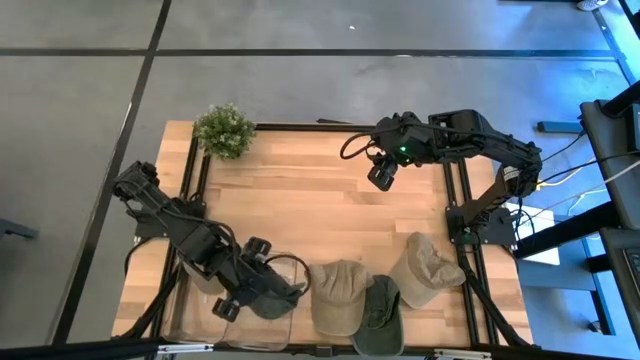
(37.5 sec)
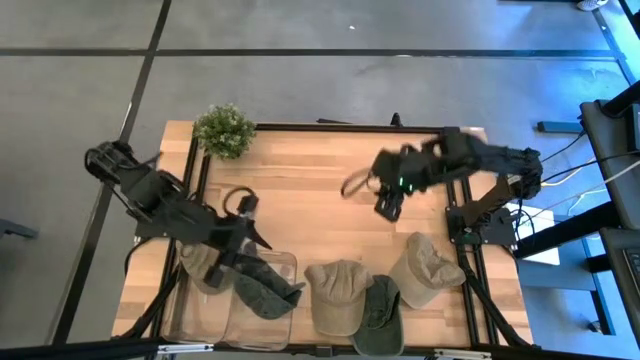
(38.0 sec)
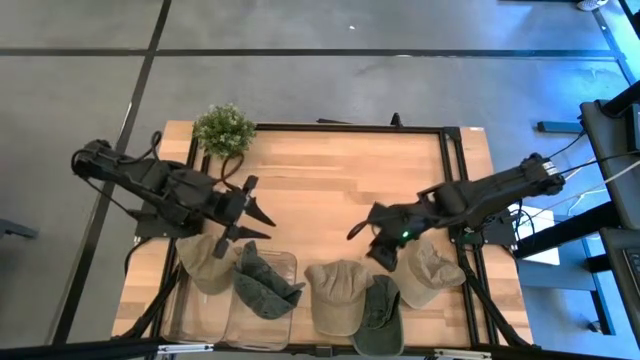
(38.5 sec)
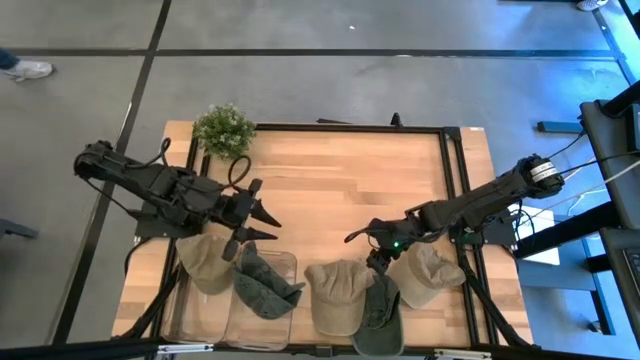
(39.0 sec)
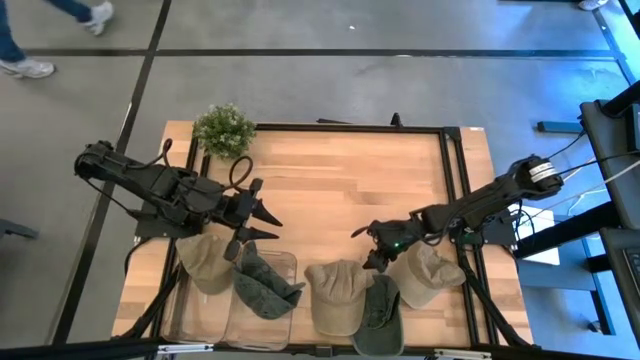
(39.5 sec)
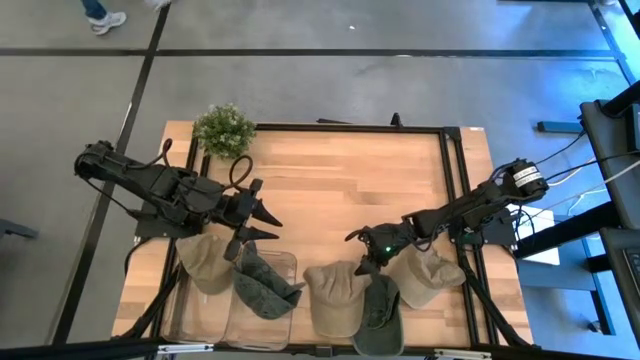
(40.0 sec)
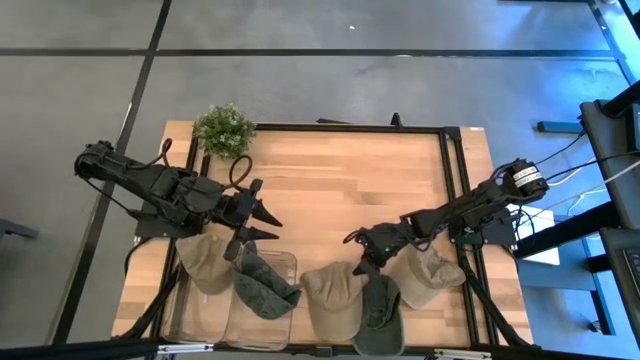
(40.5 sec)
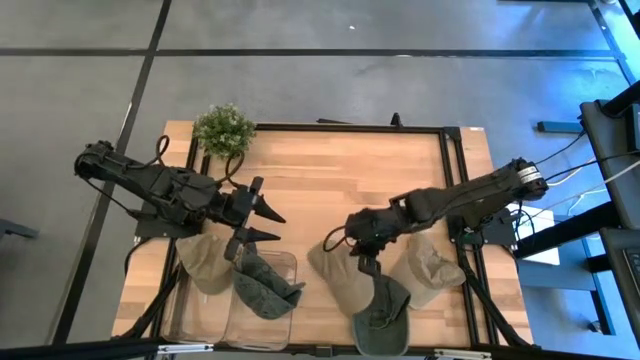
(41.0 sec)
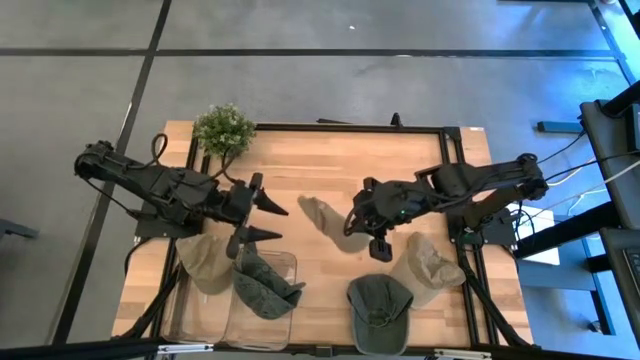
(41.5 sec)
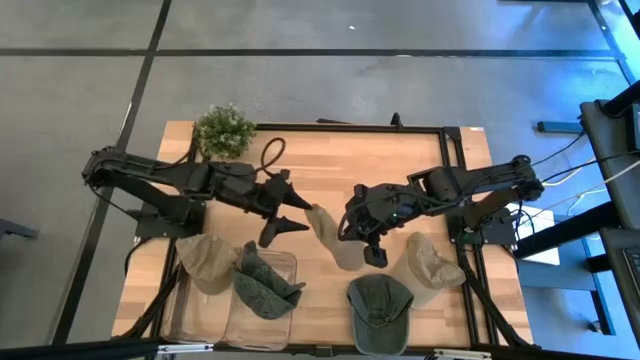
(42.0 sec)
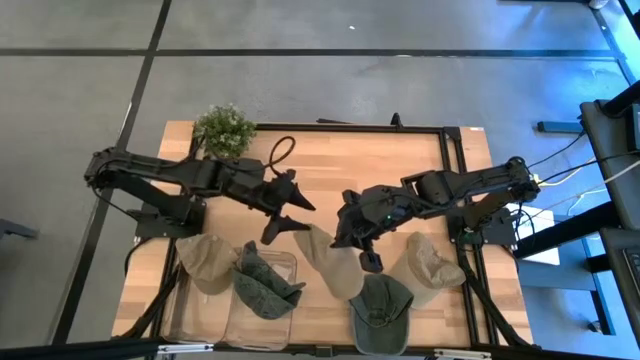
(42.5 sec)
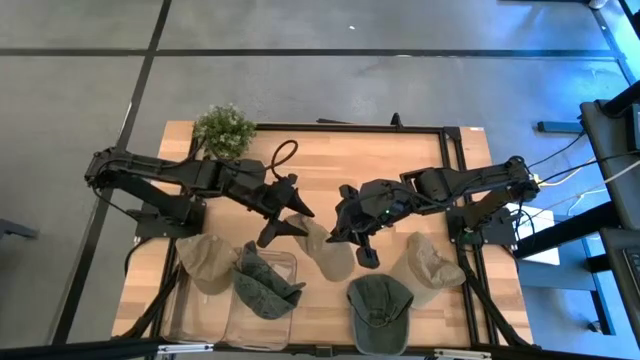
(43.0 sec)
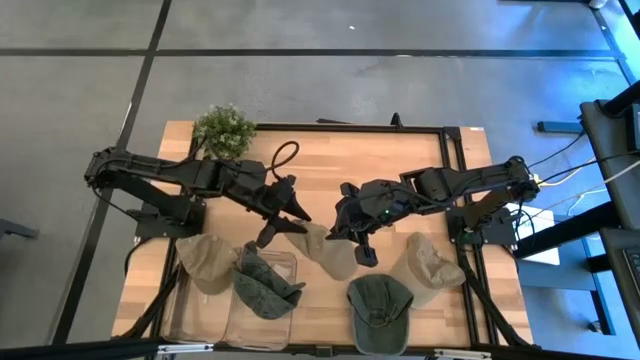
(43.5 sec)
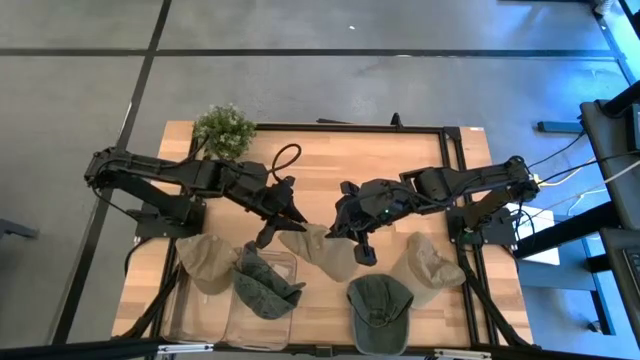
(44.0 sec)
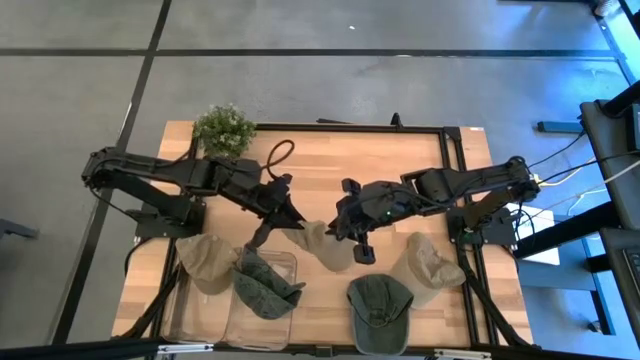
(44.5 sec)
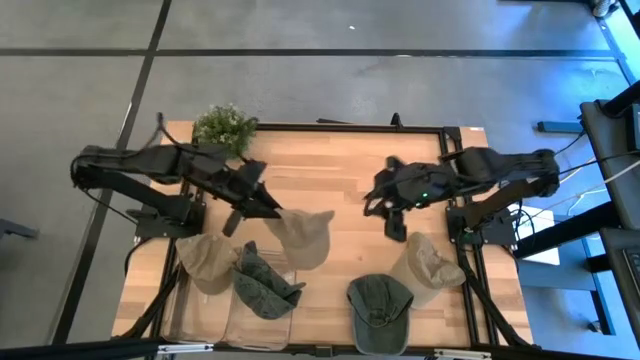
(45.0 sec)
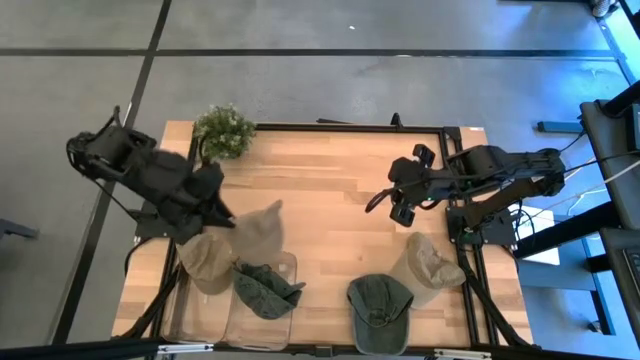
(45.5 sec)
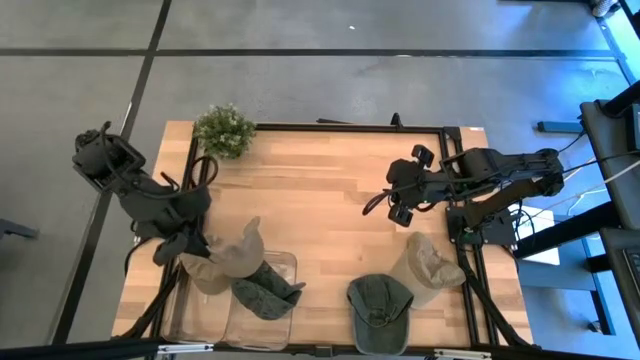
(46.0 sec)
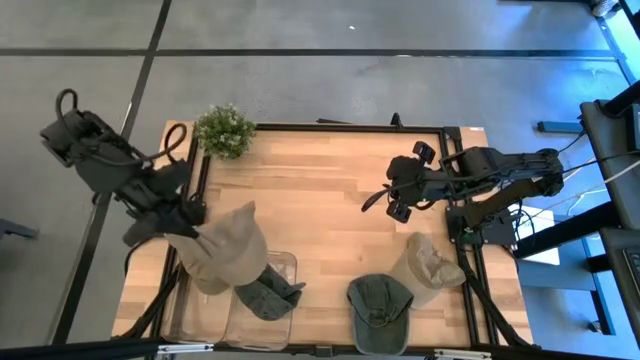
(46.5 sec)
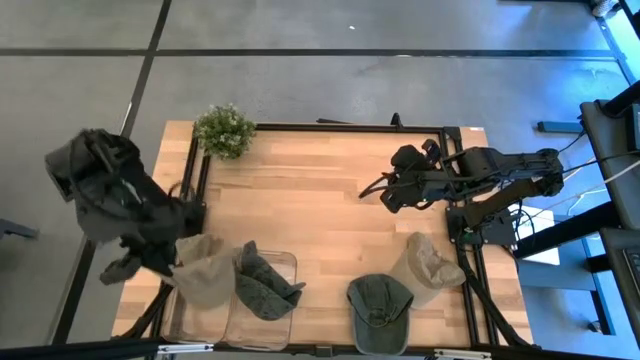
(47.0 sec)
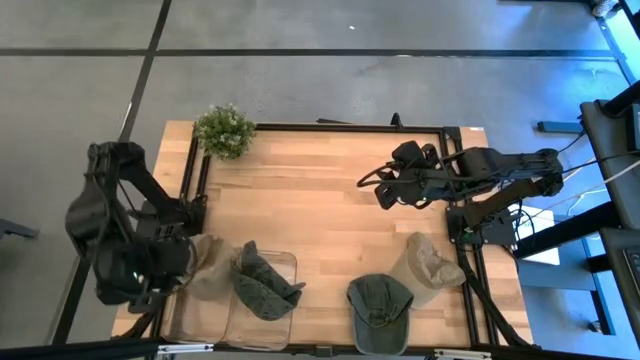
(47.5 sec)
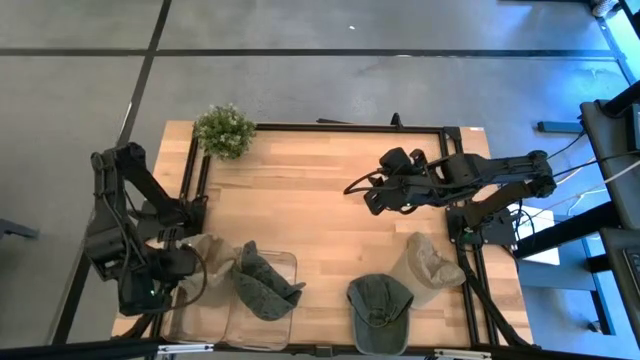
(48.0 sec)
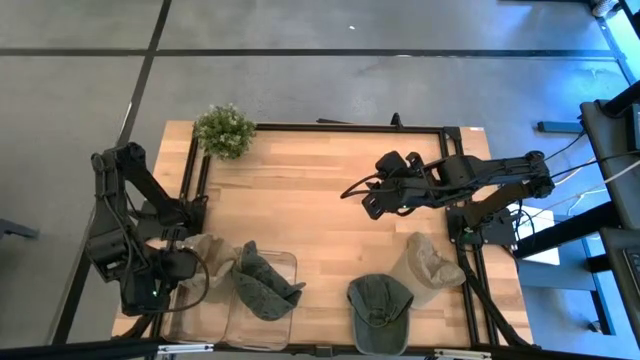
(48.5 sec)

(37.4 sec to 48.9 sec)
Task: Pick & Place hat
Put the left brown cap into the left transparent bin

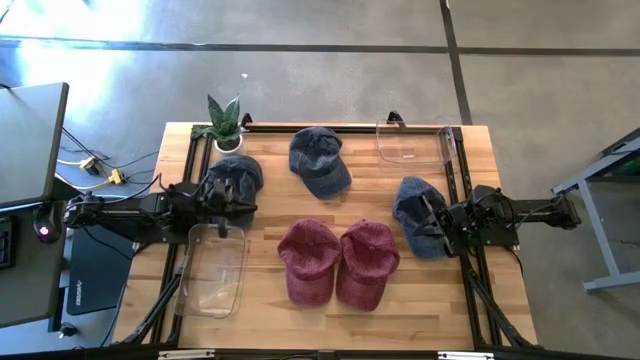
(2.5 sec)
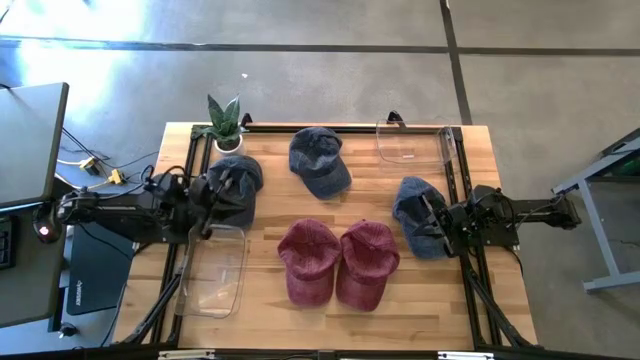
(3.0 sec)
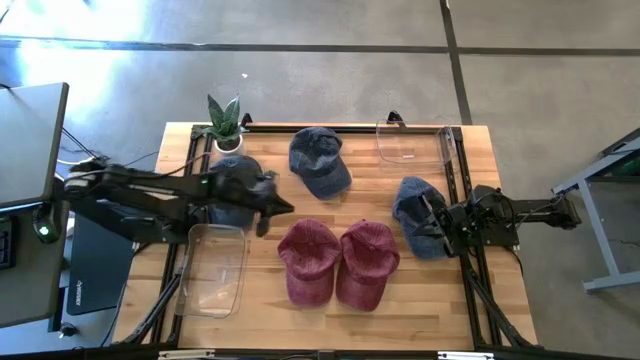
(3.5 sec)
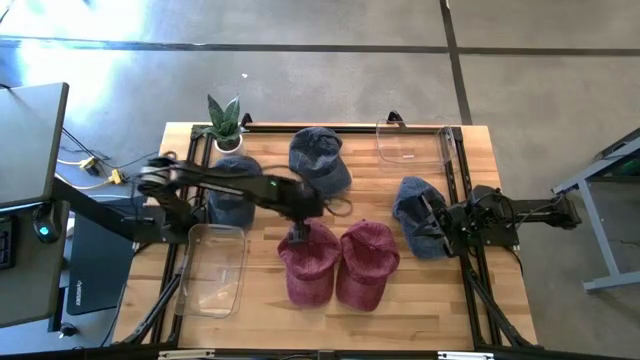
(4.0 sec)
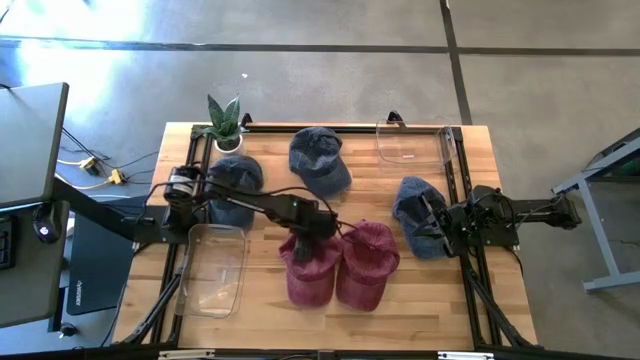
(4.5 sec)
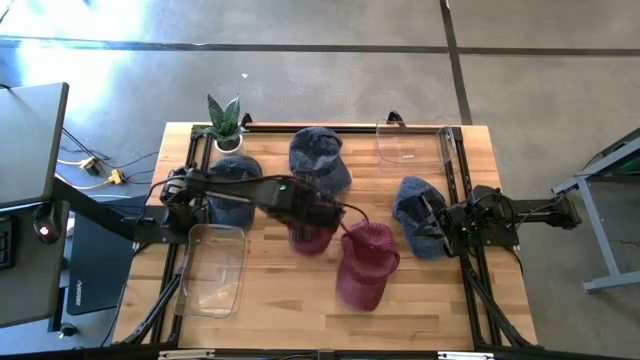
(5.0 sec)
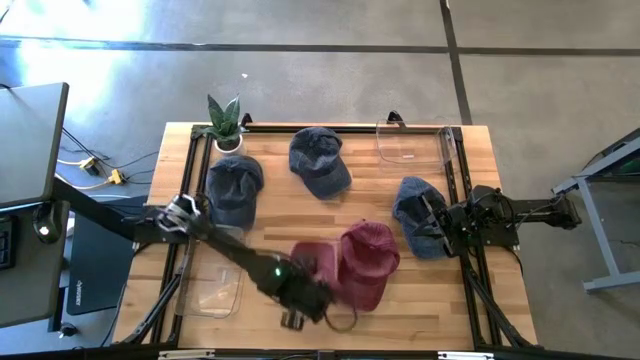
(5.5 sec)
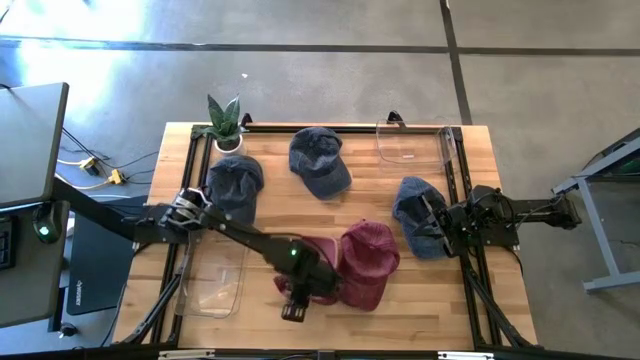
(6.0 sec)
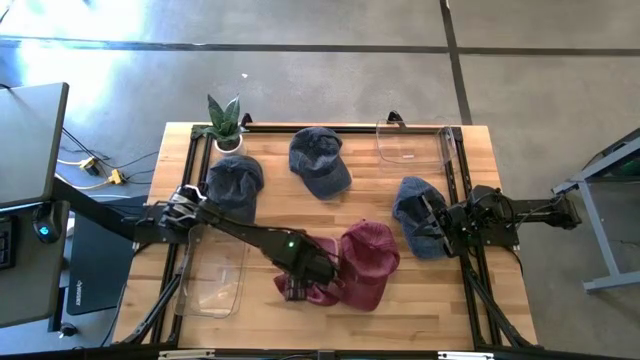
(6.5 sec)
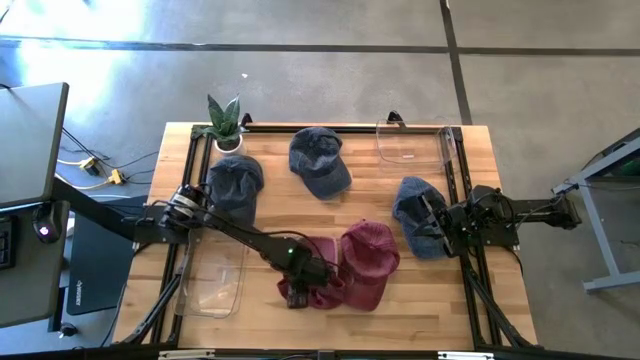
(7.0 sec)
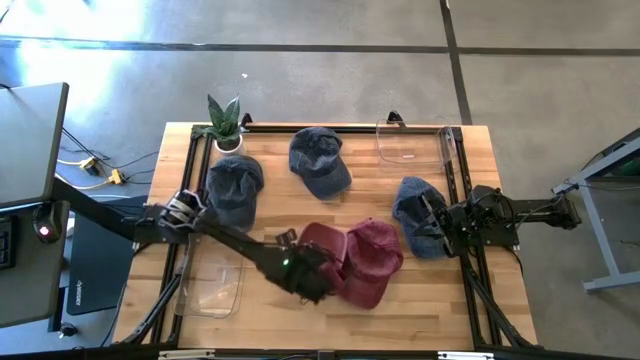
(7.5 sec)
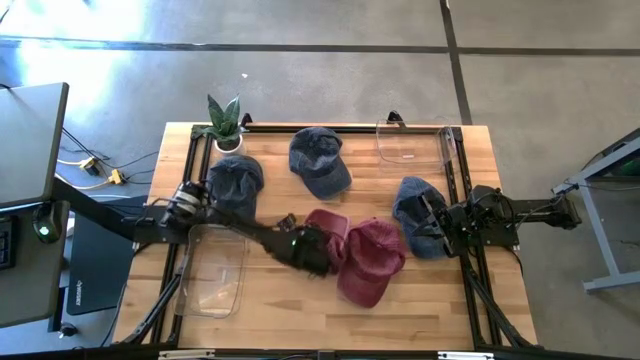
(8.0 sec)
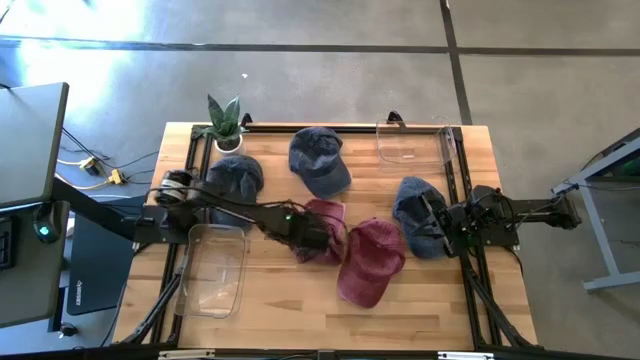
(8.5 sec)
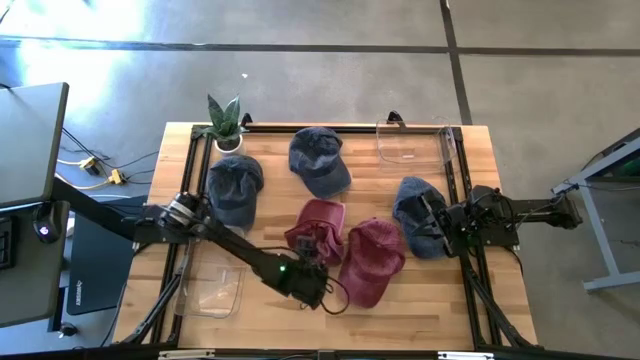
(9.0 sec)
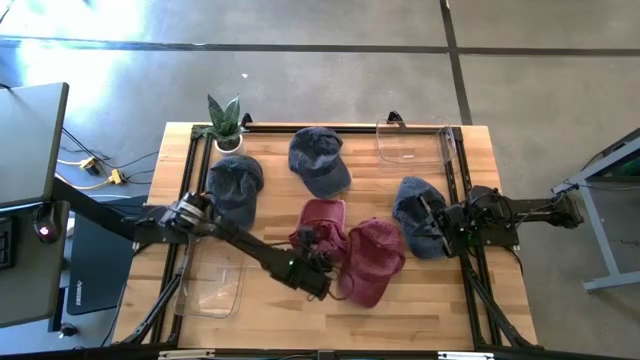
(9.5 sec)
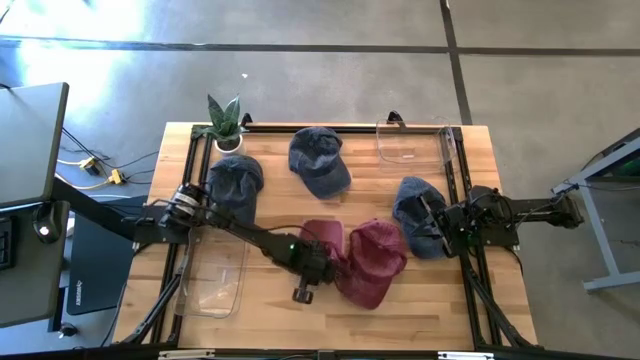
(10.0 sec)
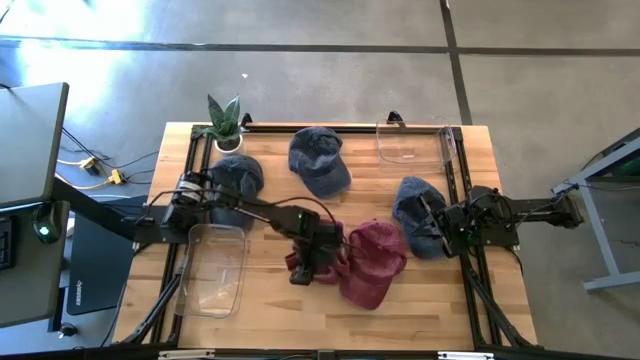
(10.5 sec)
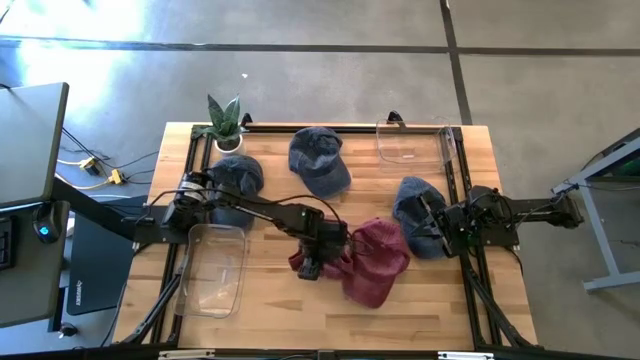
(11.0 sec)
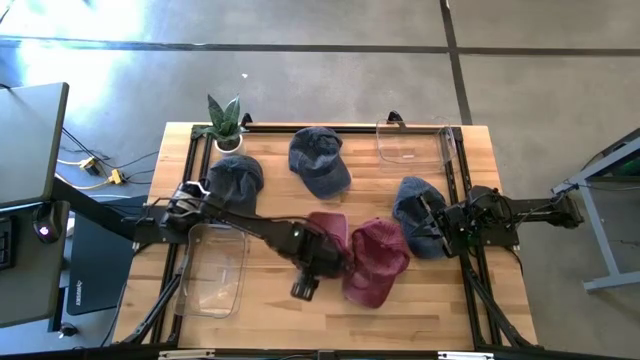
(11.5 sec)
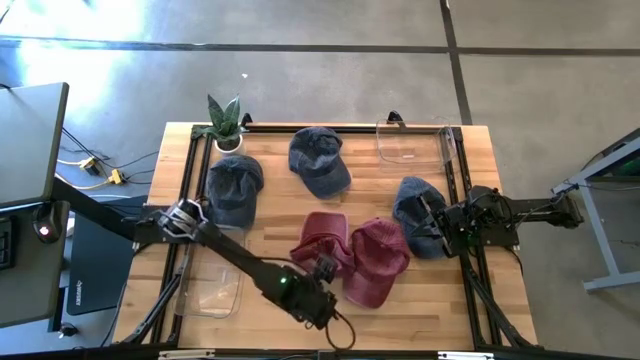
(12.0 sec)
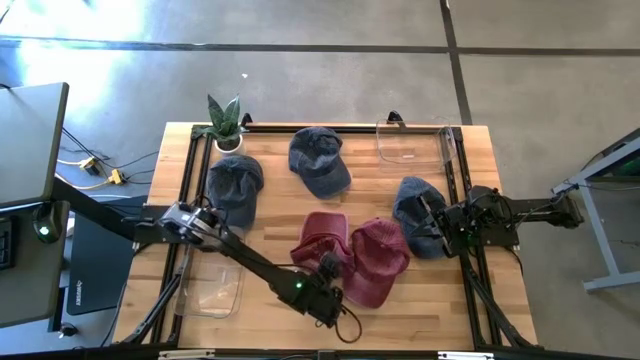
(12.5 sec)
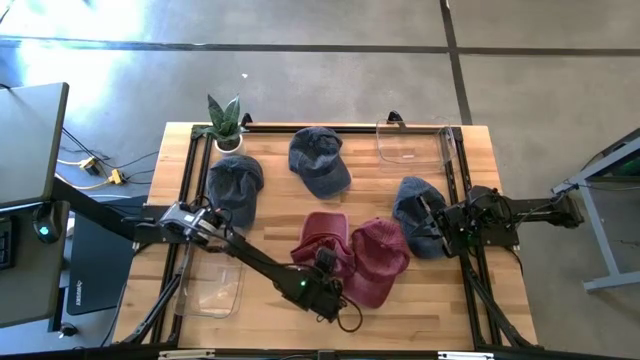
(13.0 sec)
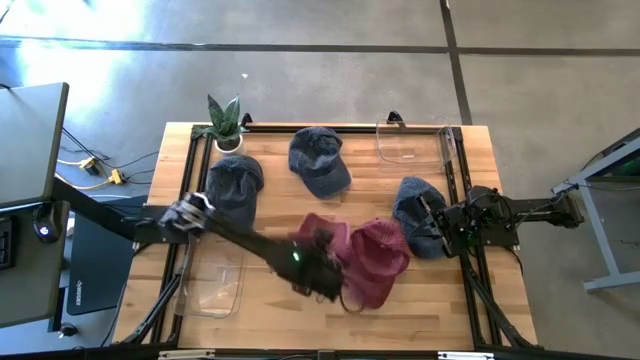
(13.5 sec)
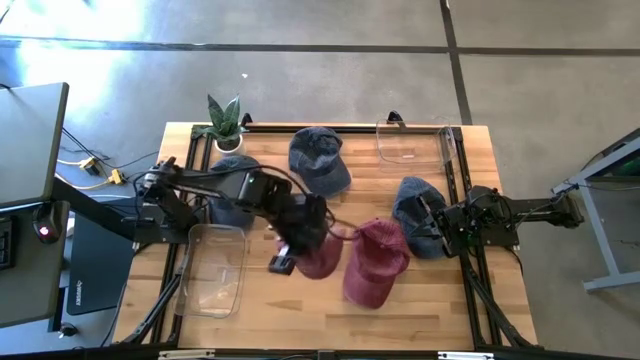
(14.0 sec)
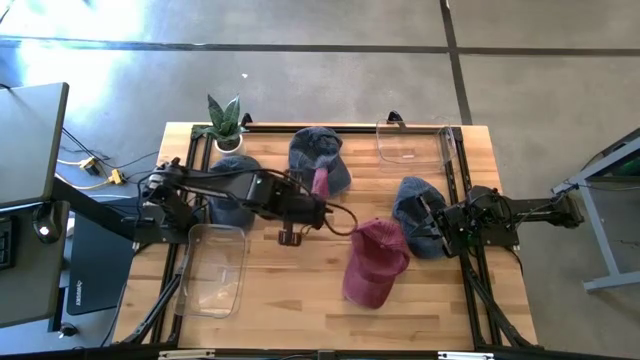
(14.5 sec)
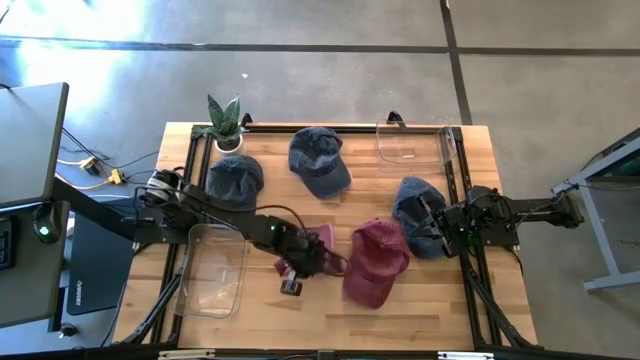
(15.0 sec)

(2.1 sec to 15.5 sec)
Task: Pick & Place hat
Put the left red cap into the bottom transparent bin
